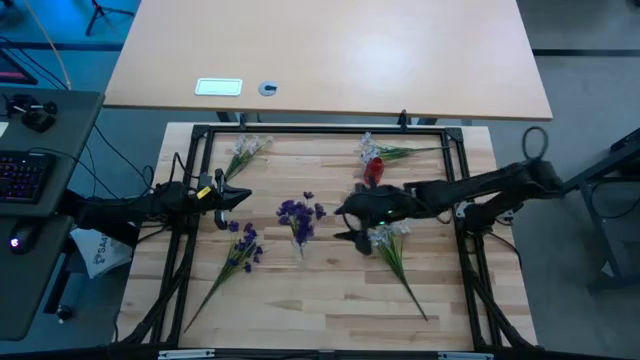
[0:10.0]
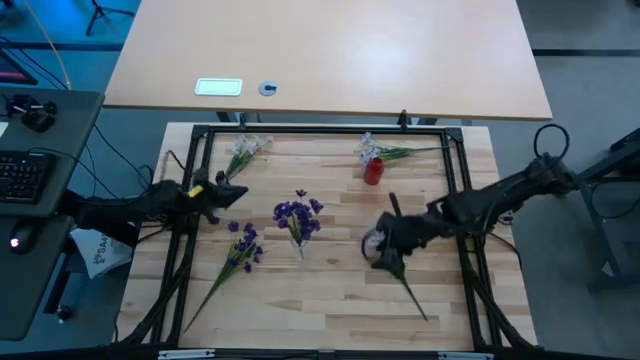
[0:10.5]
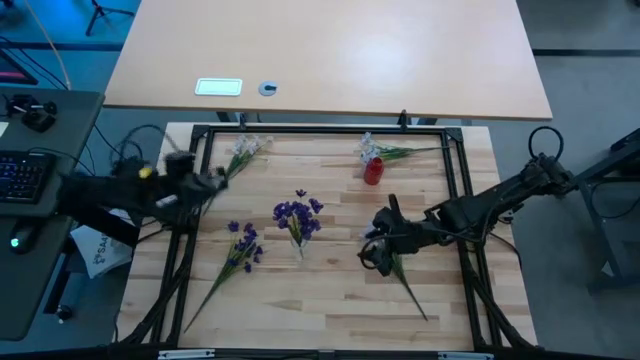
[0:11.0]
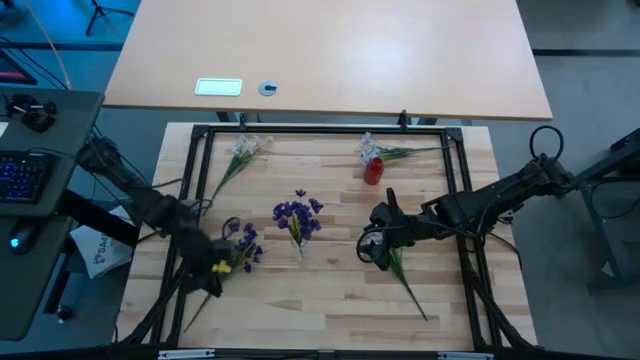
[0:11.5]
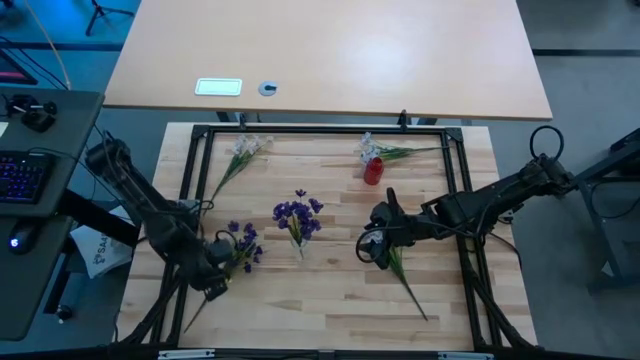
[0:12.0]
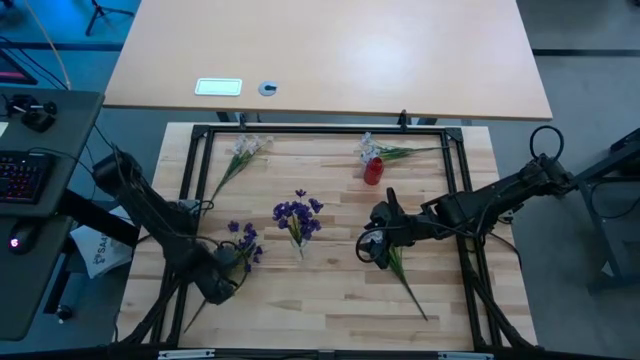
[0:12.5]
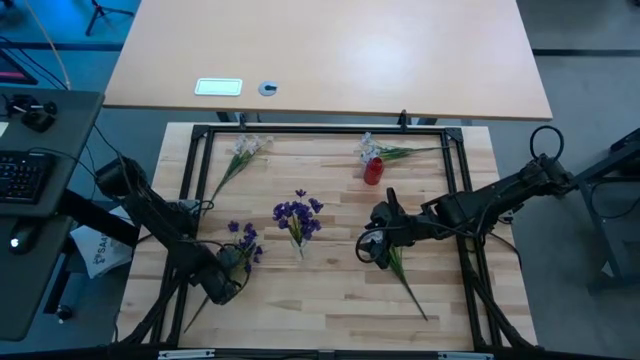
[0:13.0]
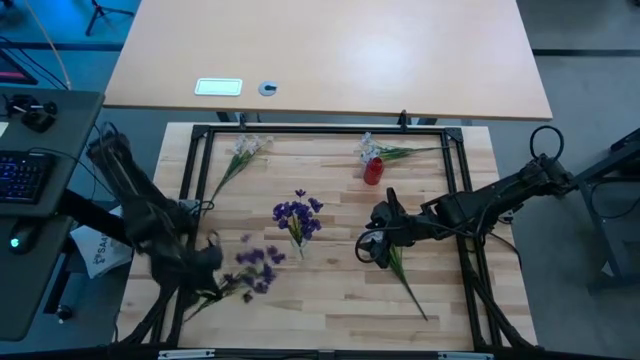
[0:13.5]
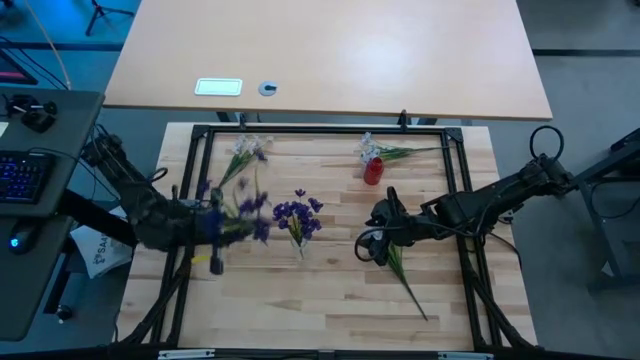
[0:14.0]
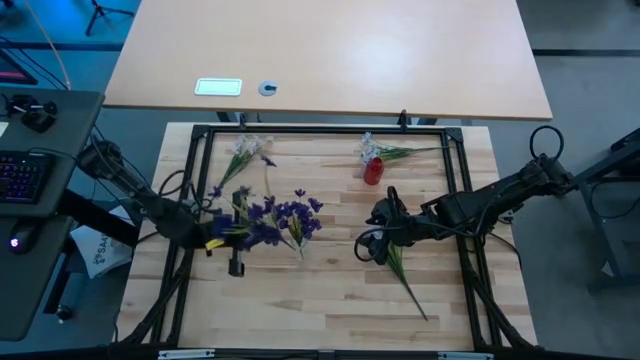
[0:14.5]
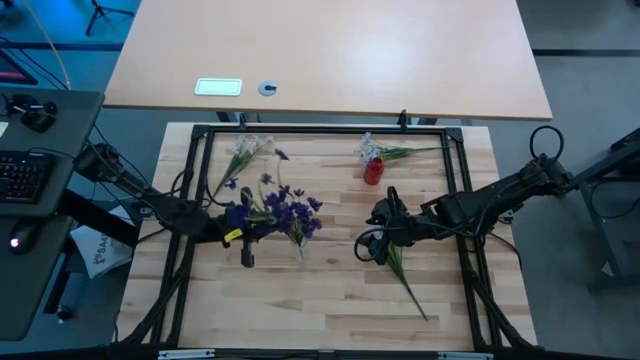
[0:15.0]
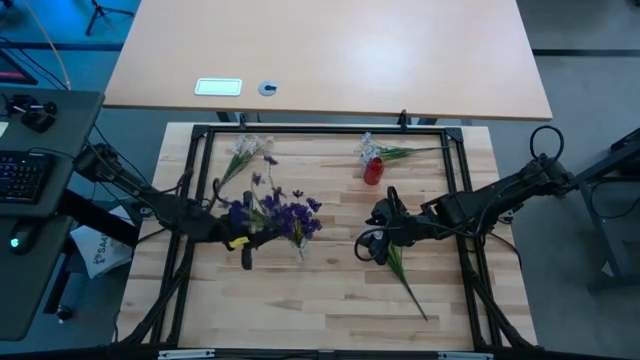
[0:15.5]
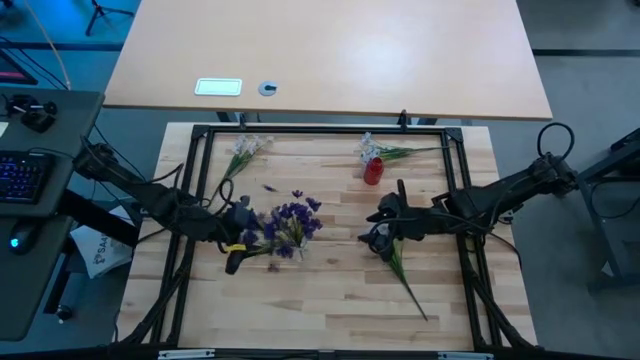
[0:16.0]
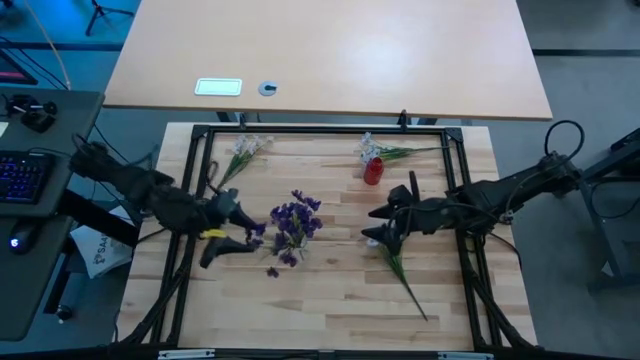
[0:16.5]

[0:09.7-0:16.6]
Task: Sort flowers into vase by color
Put the purple flowers into the transparent vase

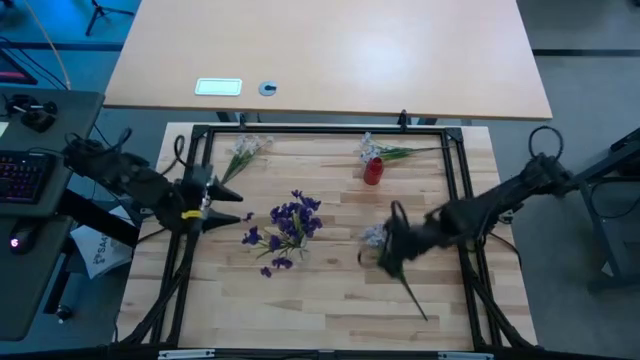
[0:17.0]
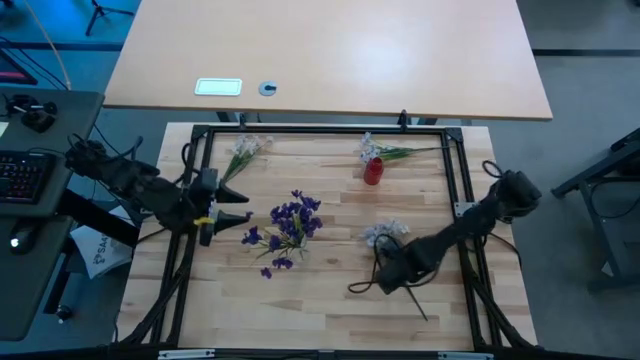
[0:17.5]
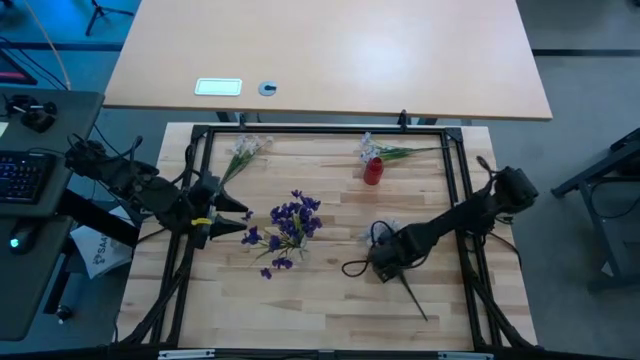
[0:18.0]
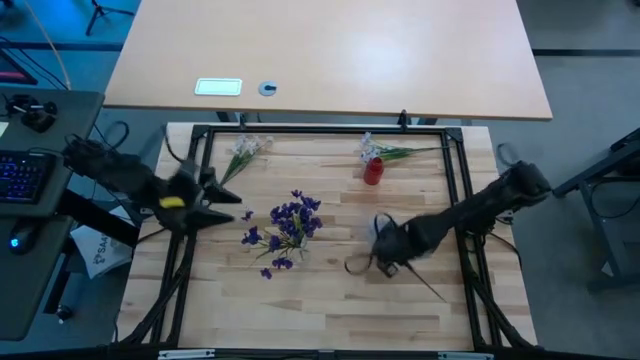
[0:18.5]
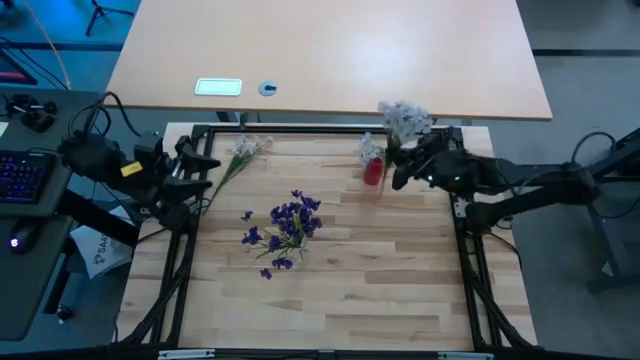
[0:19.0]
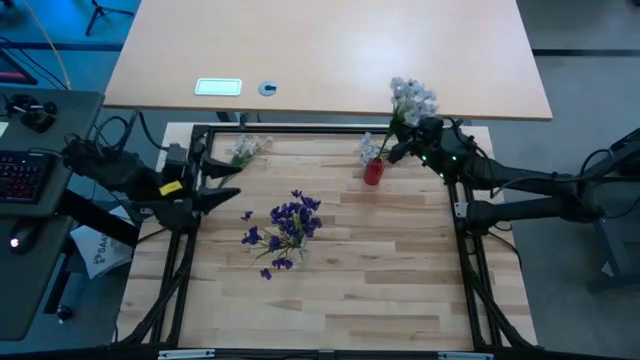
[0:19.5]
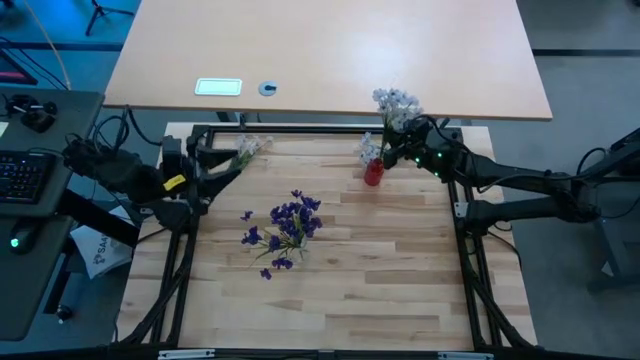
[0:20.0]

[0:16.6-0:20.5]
Put the bottom white flowers into the red vase

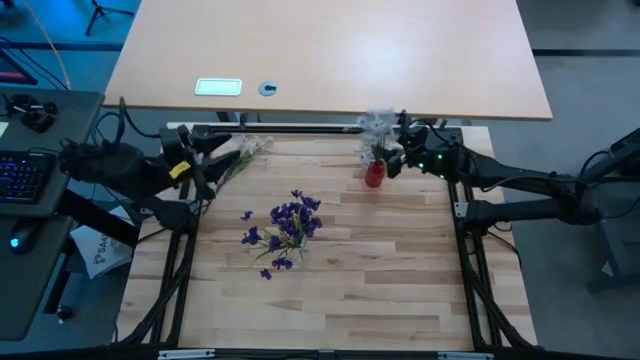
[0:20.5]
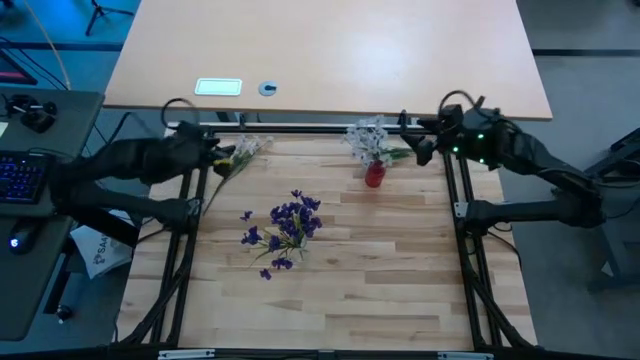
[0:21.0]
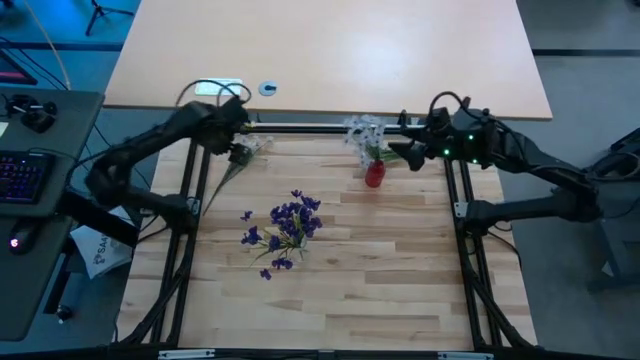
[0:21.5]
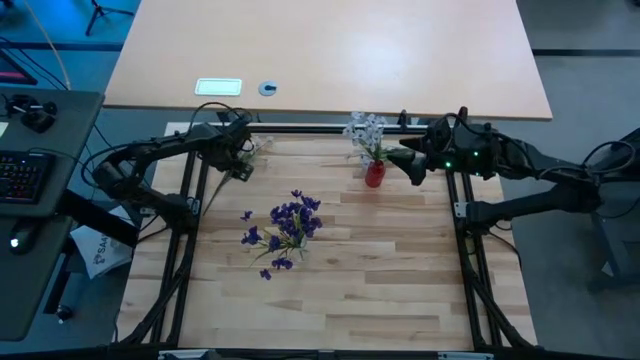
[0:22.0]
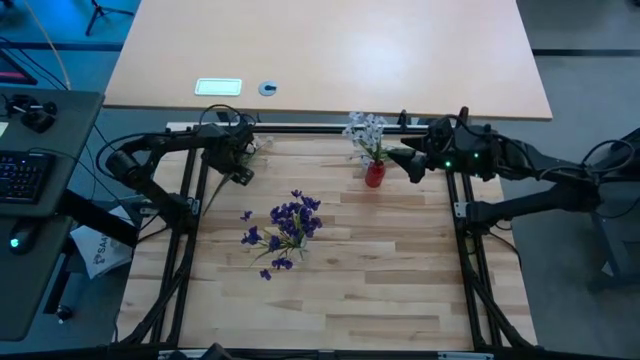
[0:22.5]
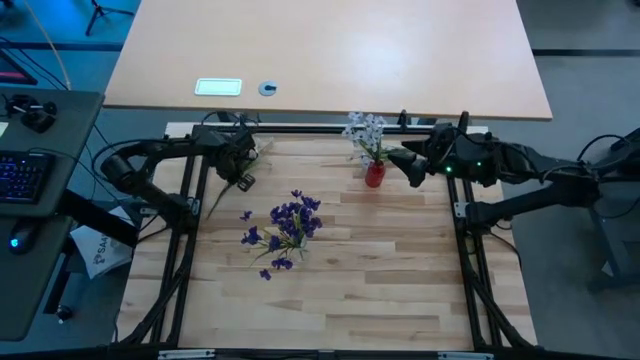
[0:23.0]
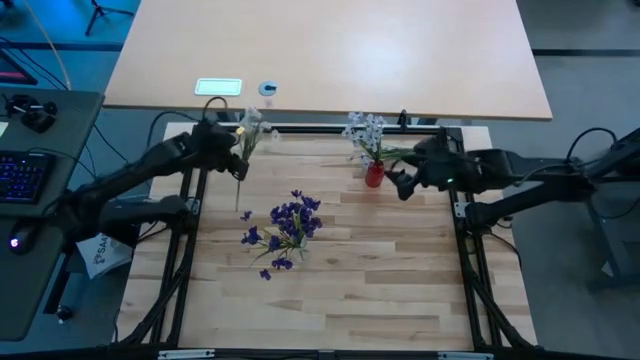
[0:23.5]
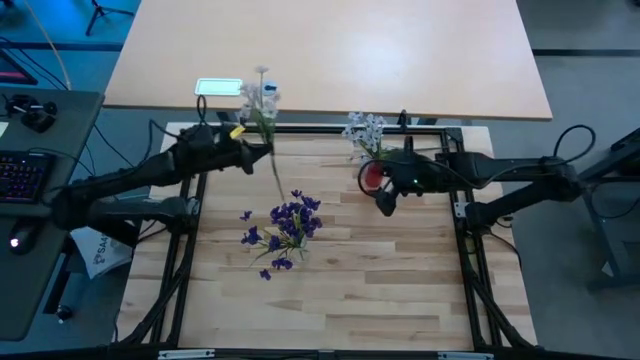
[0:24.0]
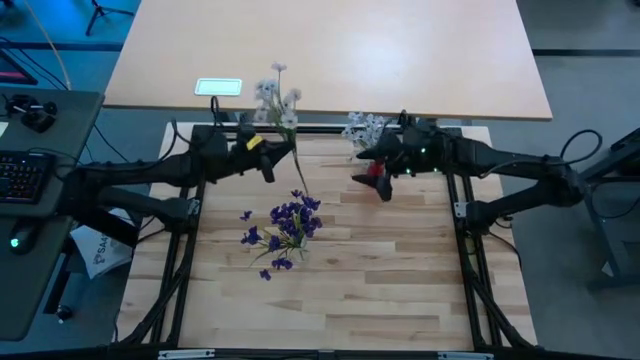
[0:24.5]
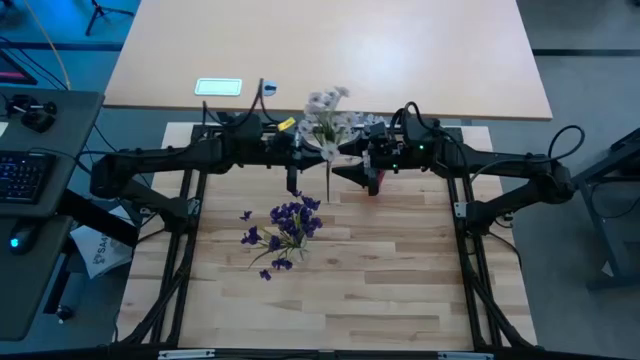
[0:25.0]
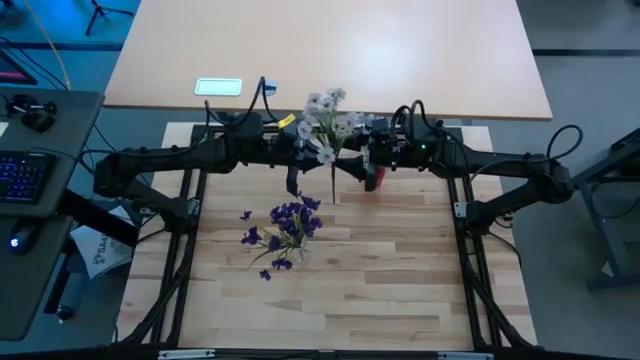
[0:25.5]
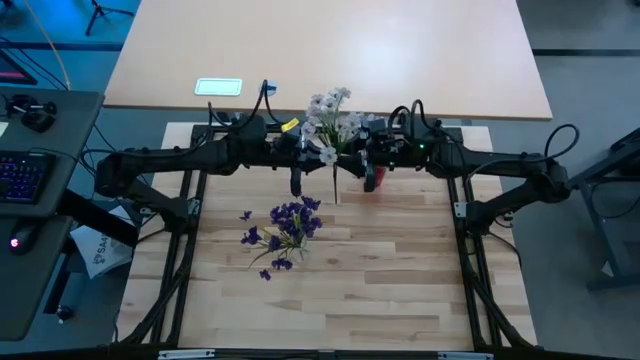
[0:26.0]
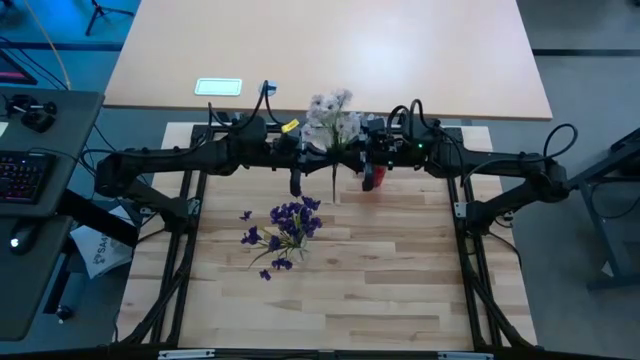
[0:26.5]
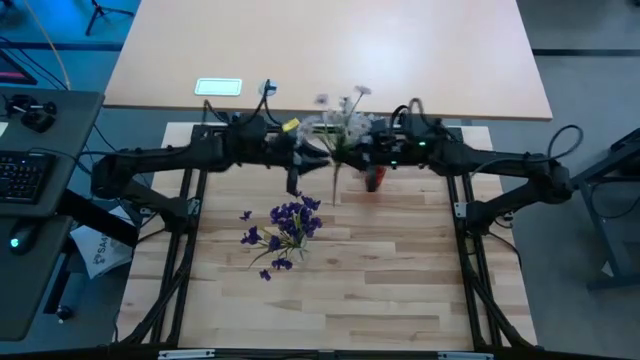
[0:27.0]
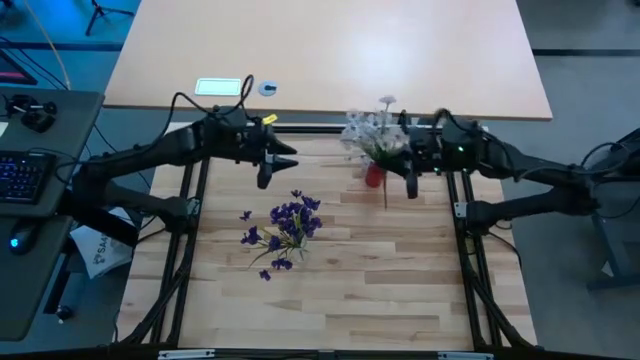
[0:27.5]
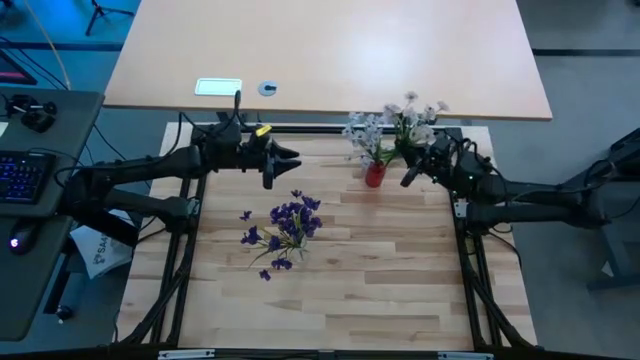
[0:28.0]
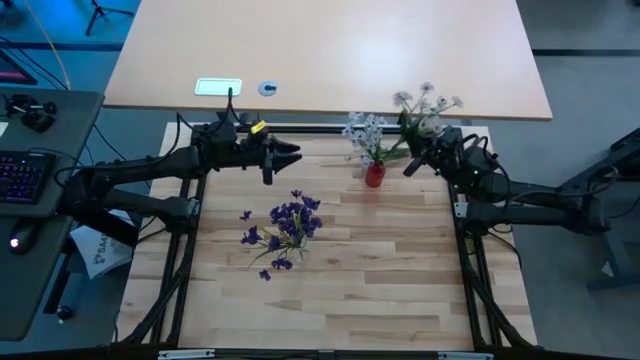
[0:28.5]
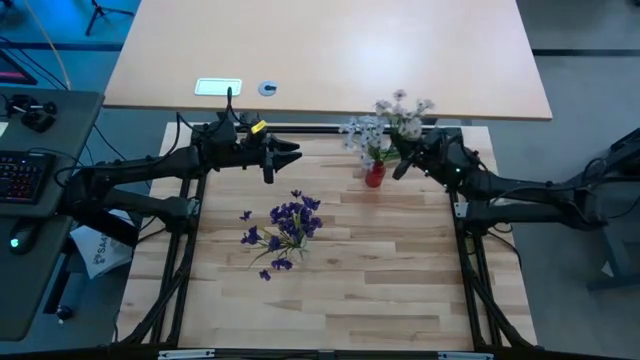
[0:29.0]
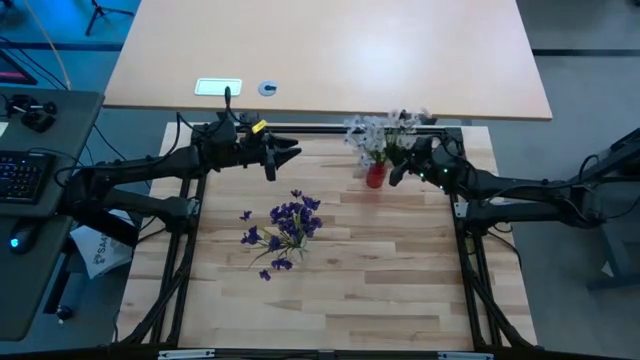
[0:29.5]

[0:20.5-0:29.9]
Put the top left white flowers into the red vase
